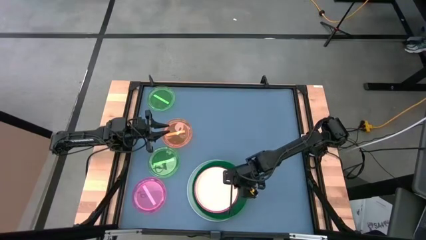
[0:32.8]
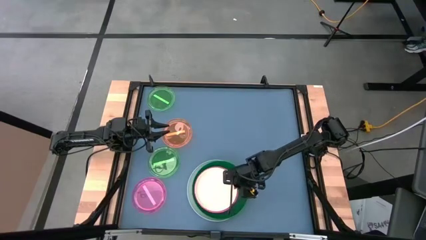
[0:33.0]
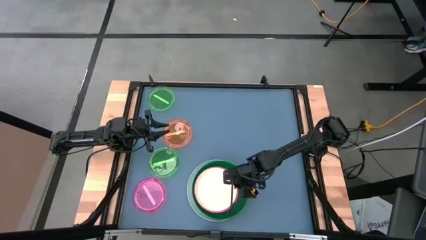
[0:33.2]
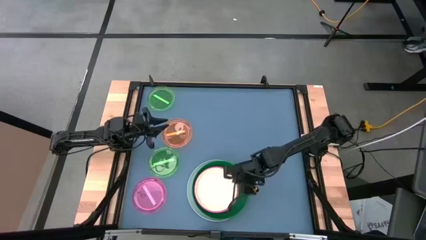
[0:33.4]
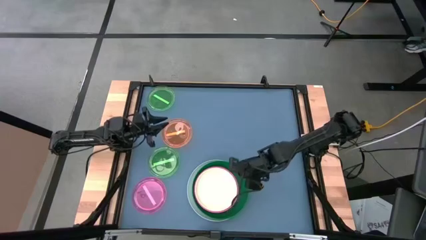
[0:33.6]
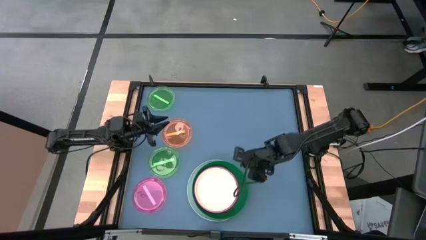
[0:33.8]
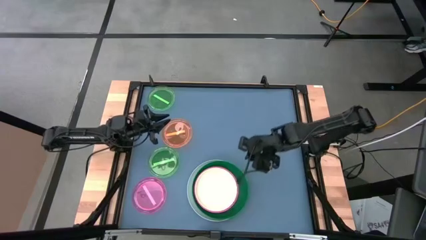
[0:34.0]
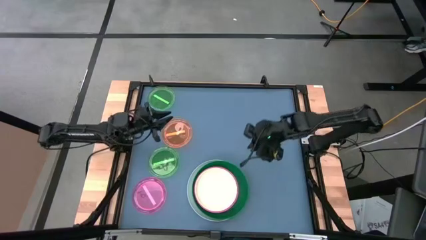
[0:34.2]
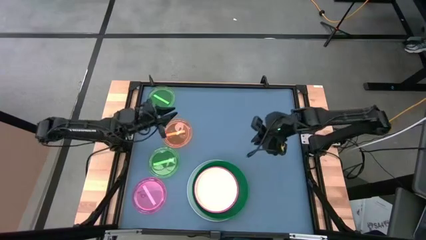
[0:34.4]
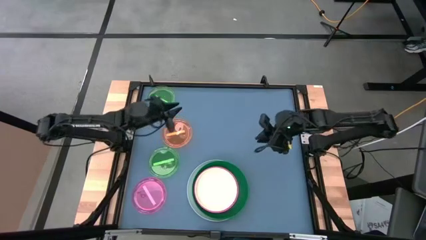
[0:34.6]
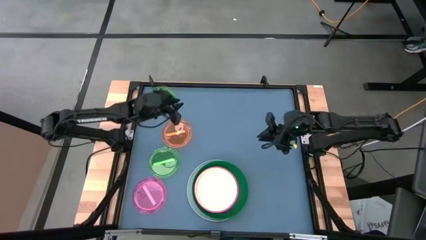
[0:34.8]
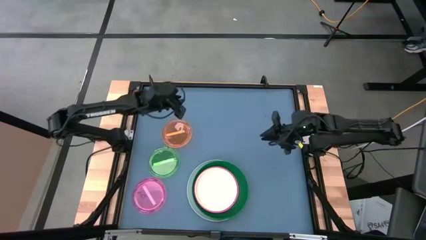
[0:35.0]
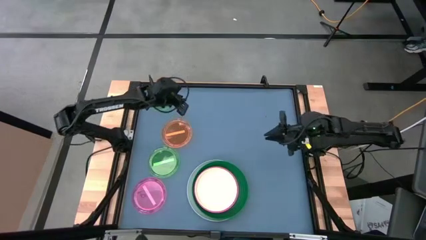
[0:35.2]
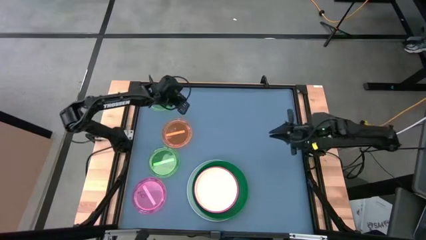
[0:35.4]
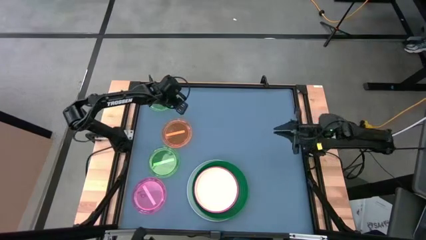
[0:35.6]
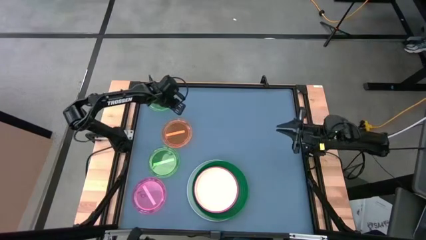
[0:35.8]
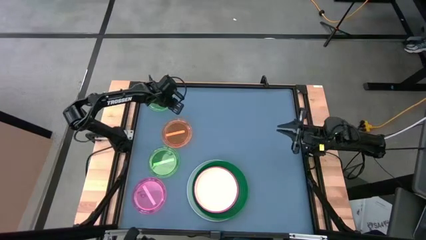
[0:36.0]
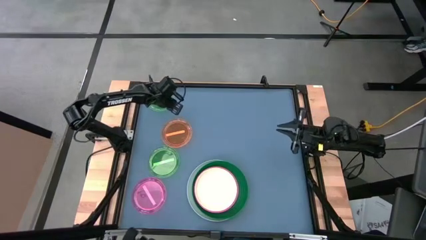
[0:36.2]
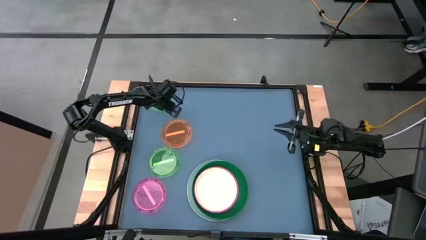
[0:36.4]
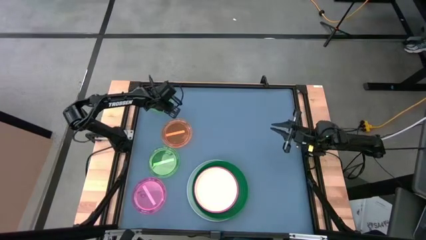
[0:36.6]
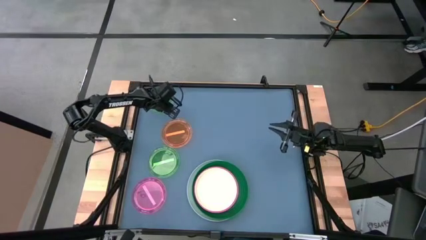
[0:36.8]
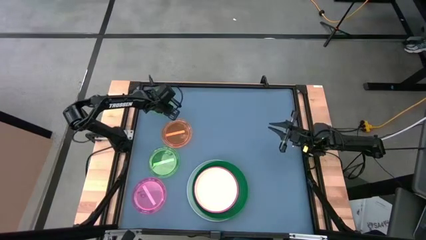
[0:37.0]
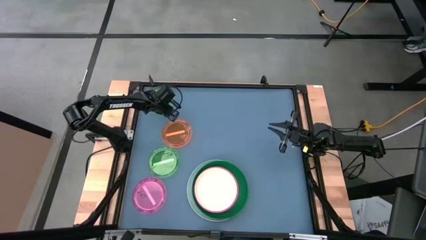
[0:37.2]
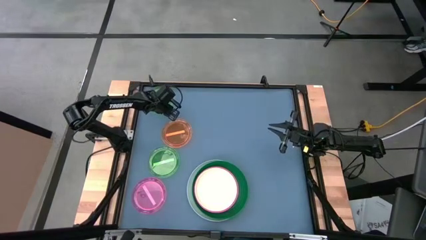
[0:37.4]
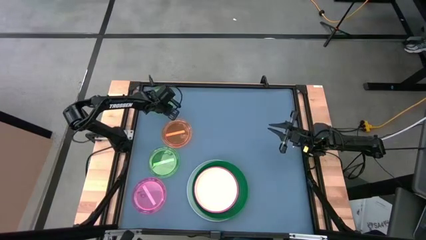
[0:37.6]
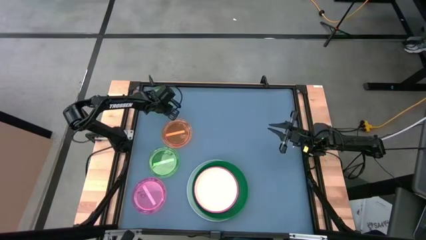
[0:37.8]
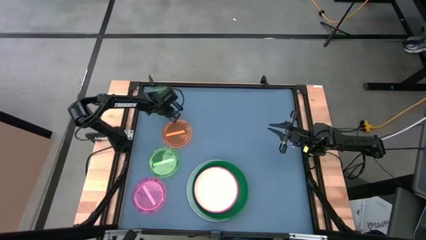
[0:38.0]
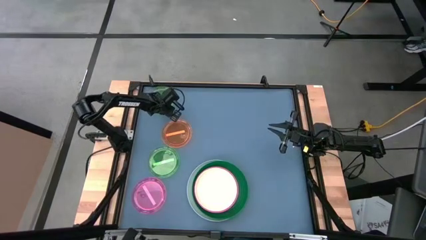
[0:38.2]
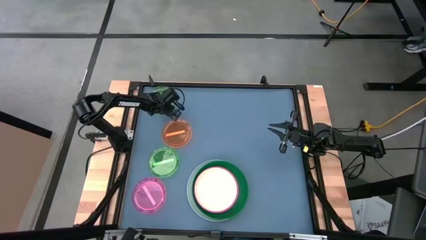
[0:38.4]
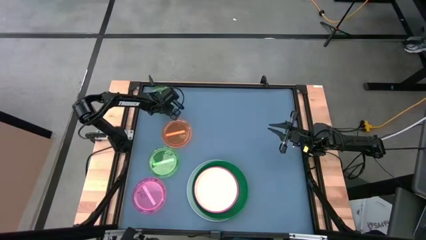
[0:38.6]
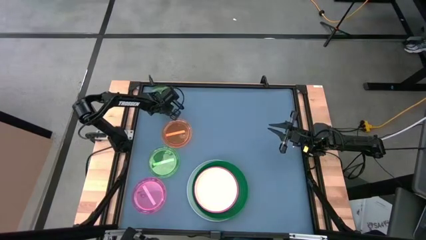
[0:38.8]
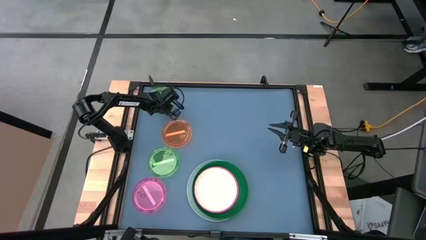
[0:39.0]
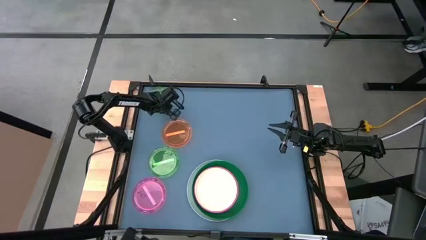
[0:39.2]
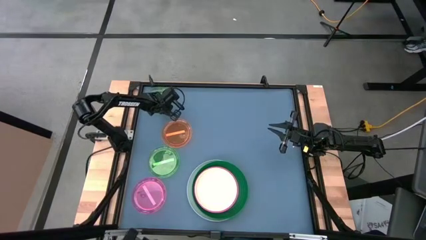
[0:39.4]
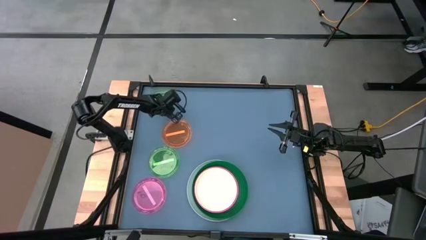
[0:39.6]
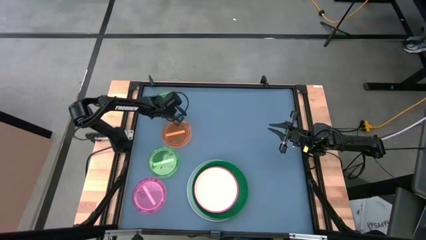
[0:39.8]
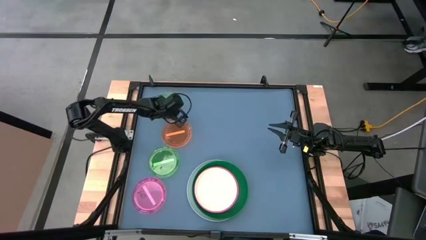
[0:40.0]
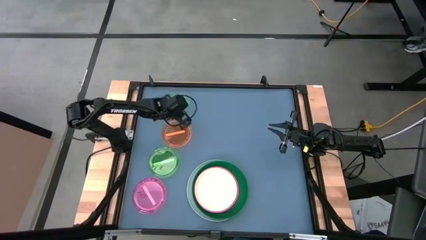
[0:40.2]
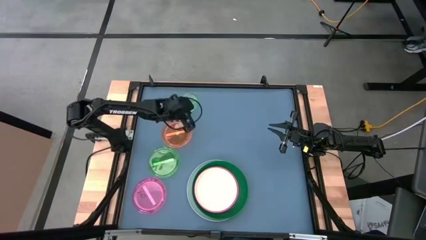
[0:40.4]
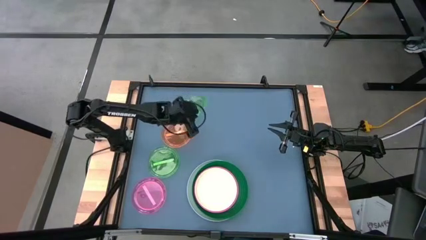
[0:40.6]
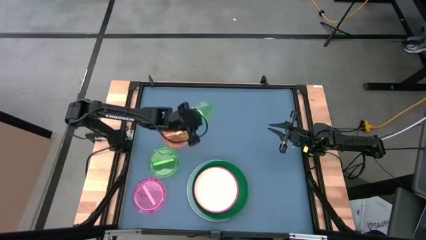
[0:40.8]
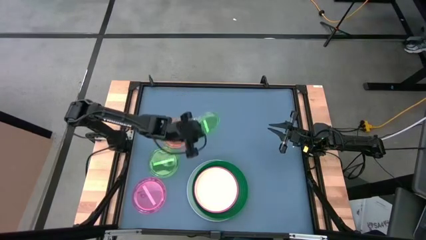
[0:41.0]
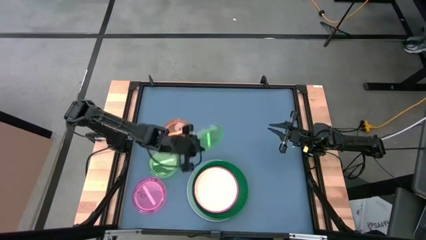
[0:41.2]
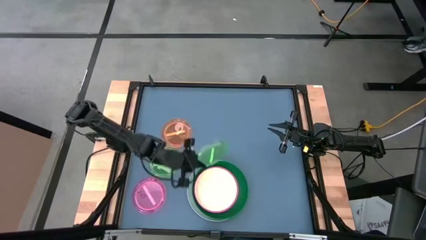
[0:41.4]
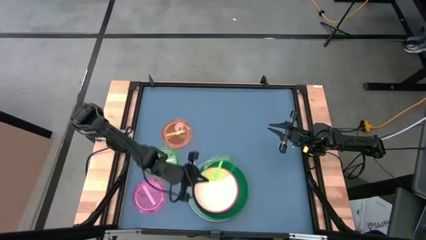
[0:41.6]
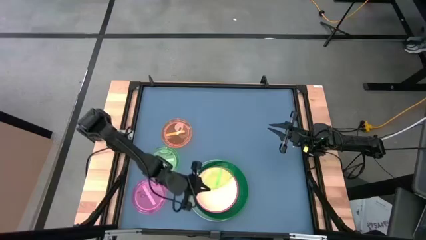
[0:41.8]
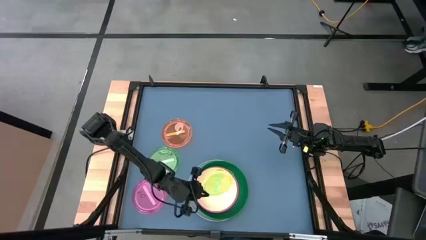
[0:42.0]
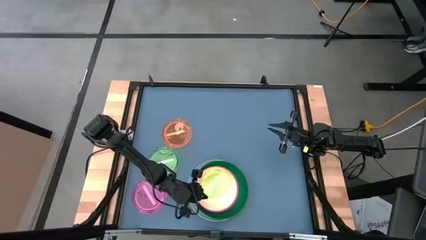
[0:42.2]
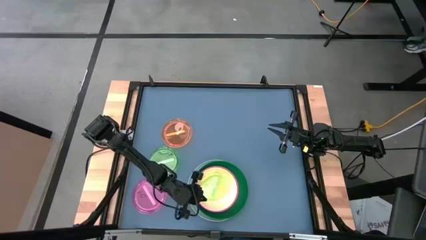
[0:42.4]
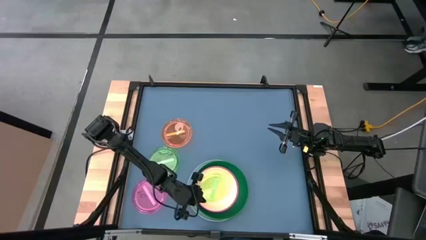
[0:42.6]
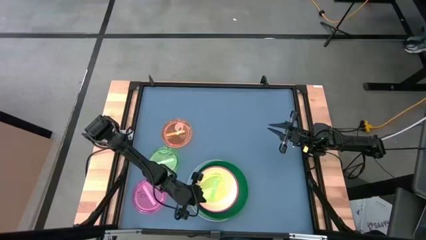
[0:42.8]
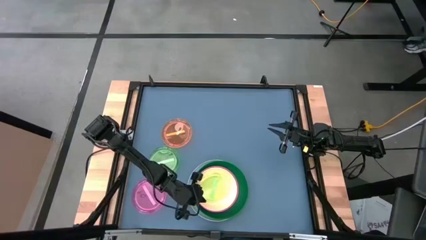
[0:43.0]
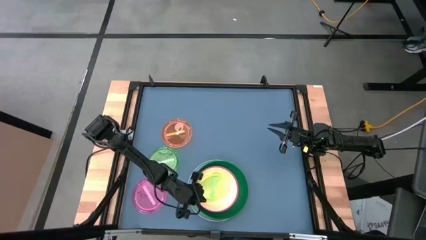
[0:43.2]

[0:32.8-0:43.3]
Task: Stack plastic plates
Stack the top green plate on the white plate
